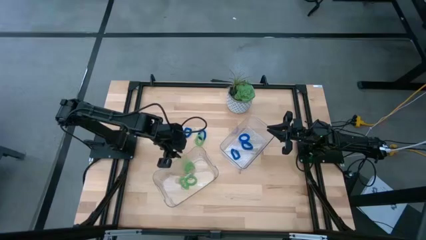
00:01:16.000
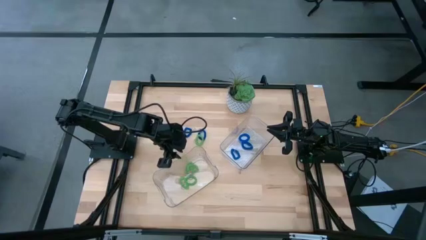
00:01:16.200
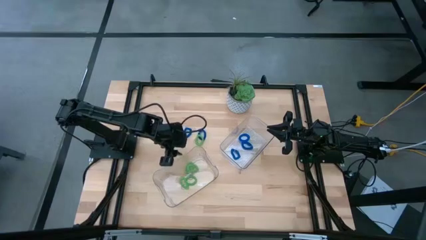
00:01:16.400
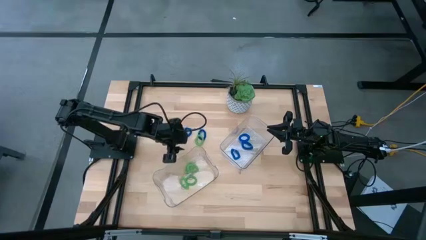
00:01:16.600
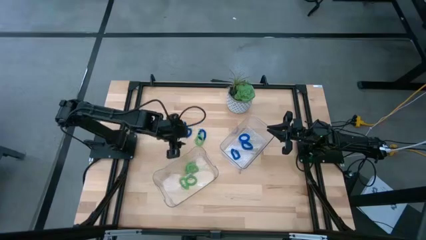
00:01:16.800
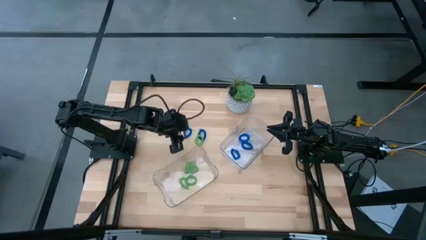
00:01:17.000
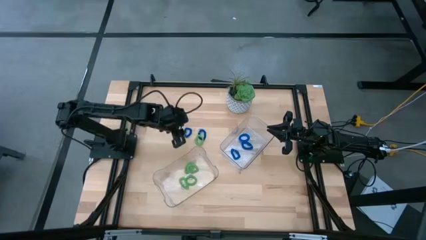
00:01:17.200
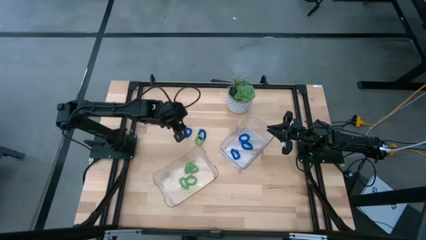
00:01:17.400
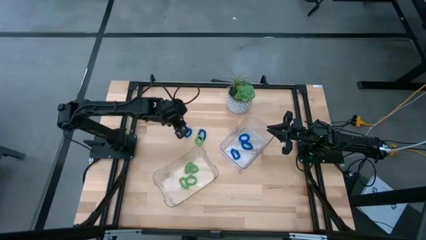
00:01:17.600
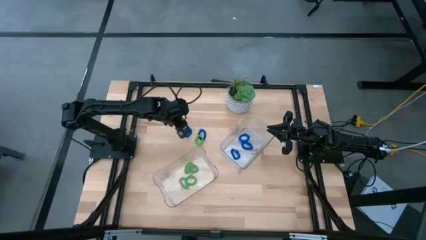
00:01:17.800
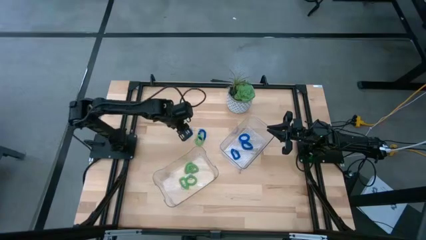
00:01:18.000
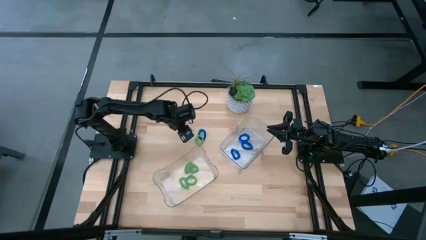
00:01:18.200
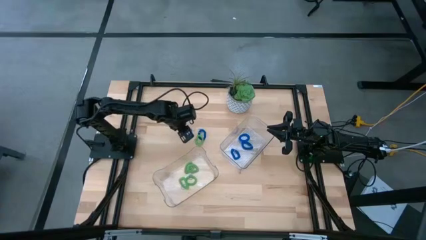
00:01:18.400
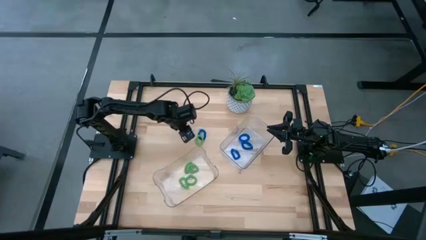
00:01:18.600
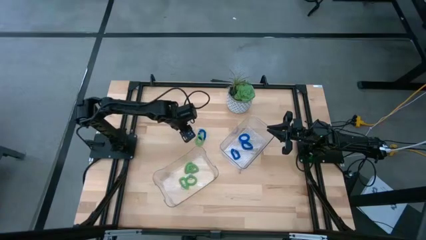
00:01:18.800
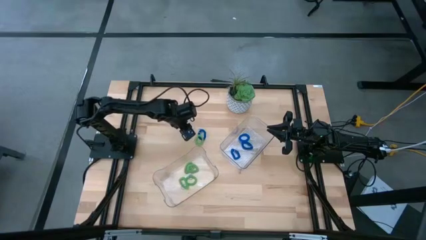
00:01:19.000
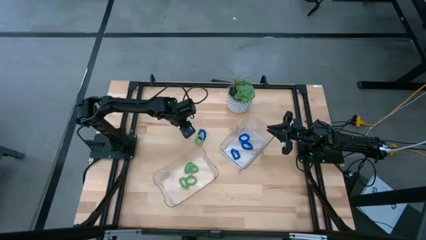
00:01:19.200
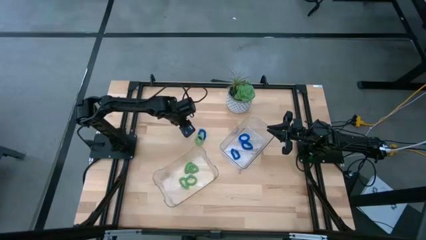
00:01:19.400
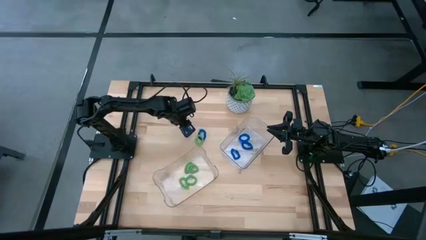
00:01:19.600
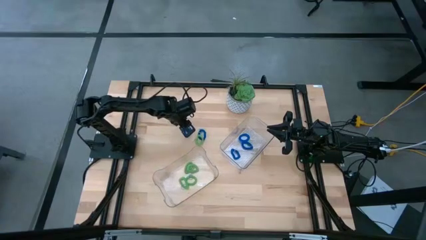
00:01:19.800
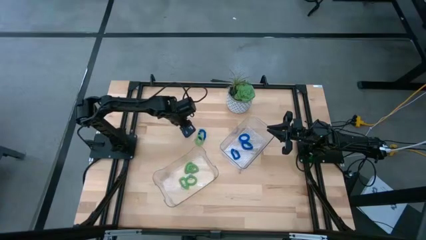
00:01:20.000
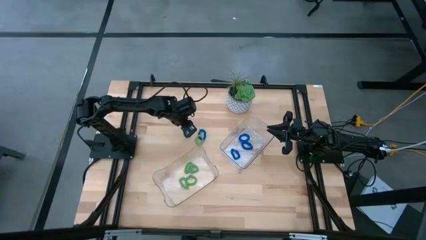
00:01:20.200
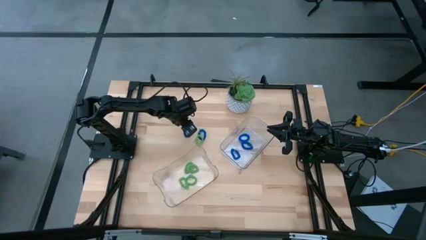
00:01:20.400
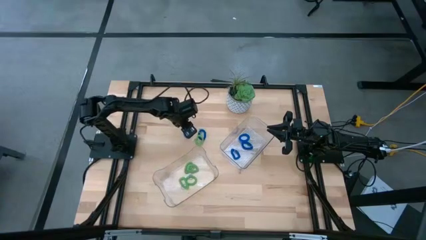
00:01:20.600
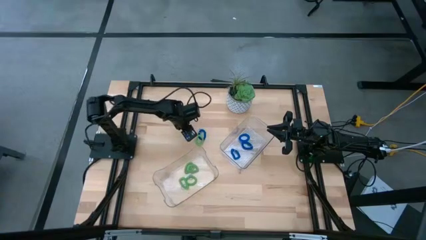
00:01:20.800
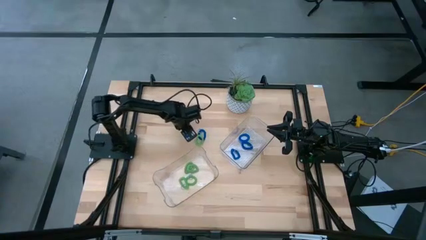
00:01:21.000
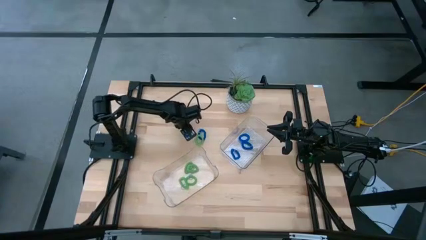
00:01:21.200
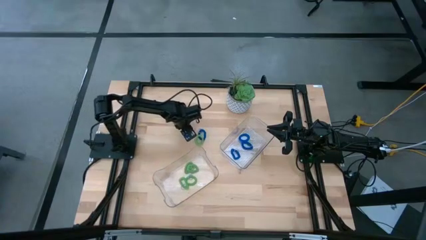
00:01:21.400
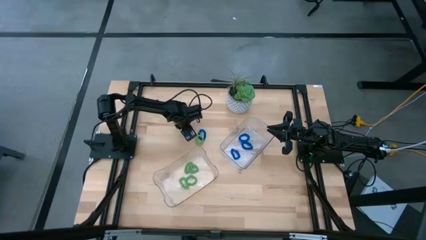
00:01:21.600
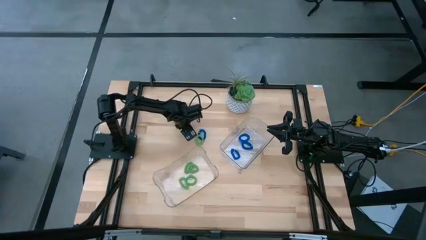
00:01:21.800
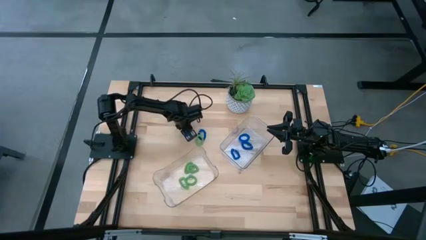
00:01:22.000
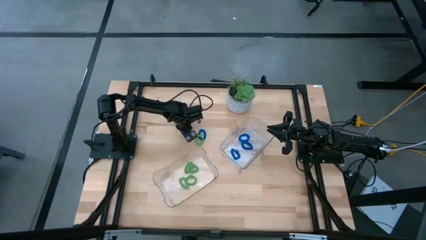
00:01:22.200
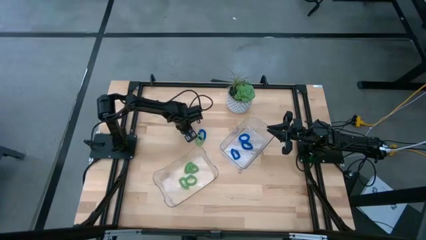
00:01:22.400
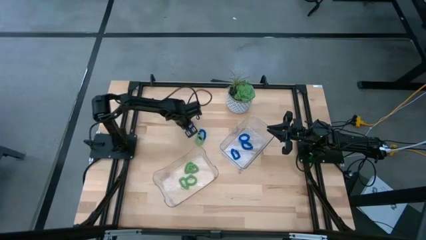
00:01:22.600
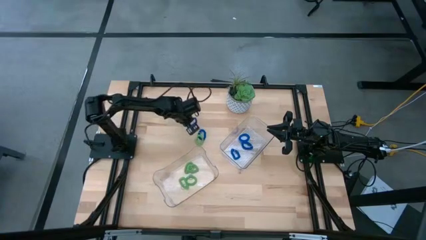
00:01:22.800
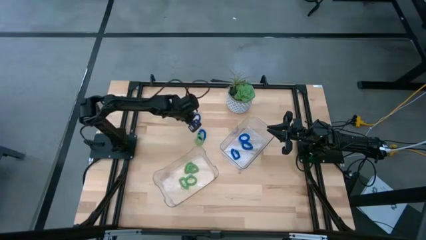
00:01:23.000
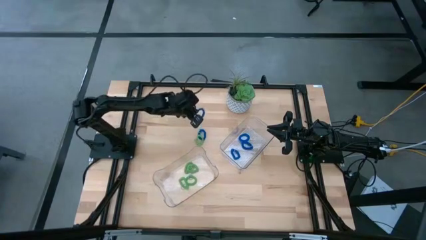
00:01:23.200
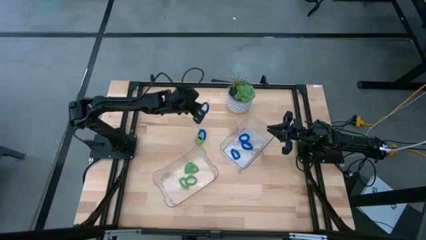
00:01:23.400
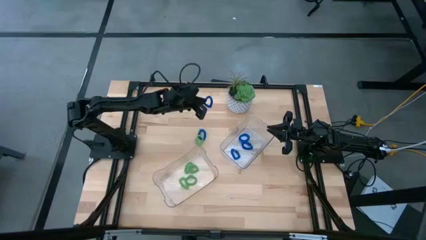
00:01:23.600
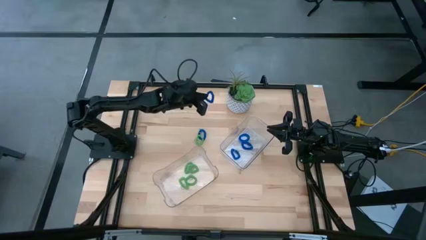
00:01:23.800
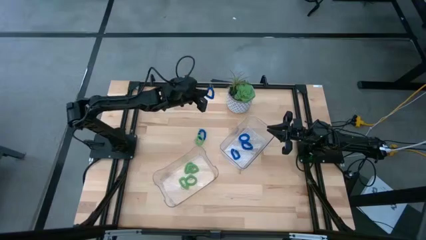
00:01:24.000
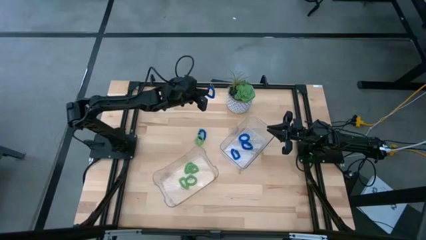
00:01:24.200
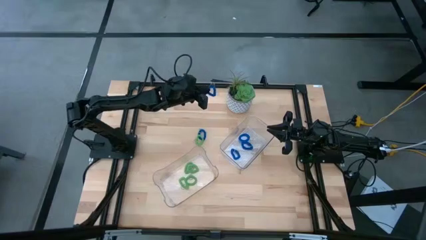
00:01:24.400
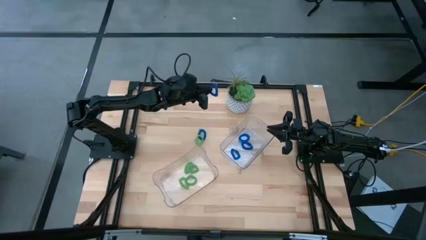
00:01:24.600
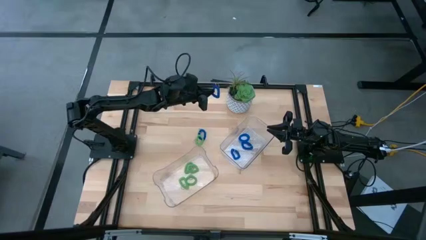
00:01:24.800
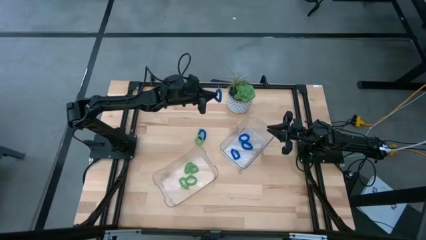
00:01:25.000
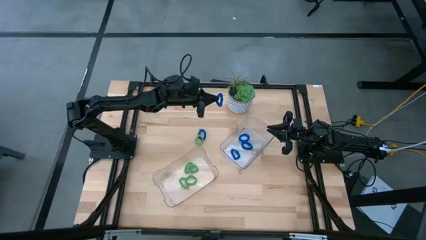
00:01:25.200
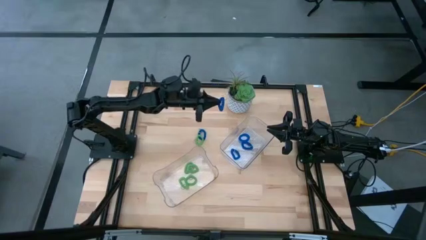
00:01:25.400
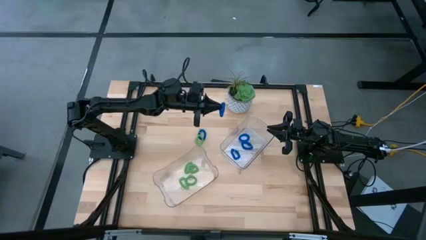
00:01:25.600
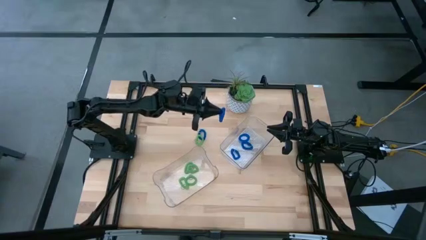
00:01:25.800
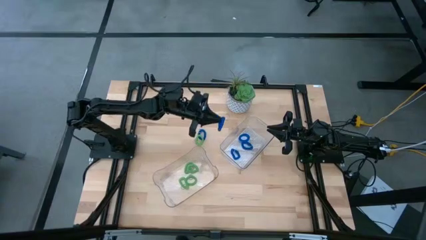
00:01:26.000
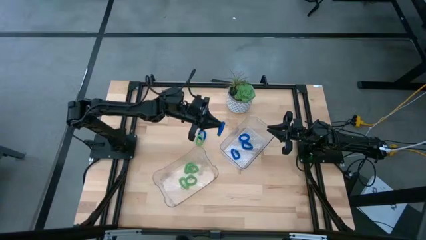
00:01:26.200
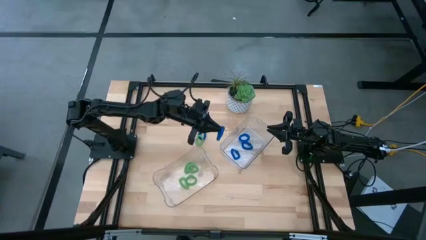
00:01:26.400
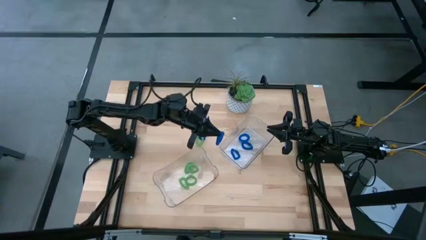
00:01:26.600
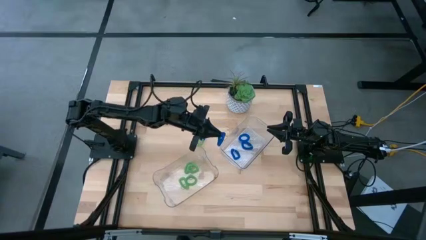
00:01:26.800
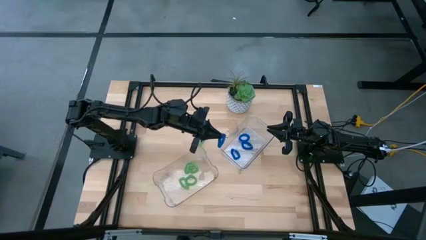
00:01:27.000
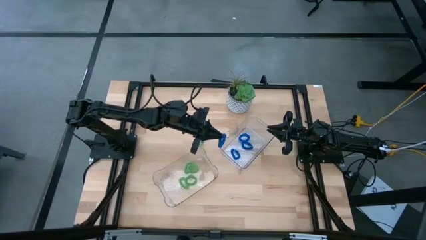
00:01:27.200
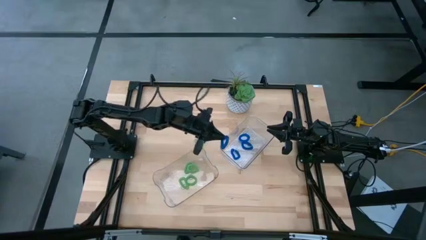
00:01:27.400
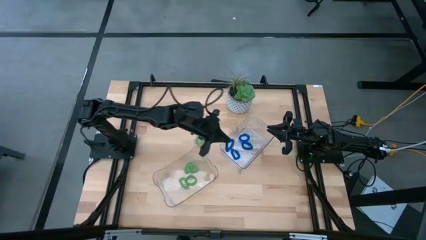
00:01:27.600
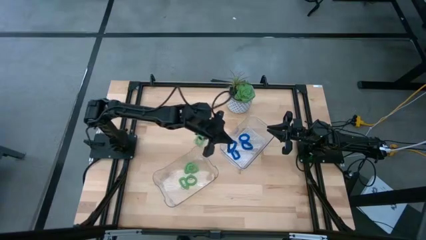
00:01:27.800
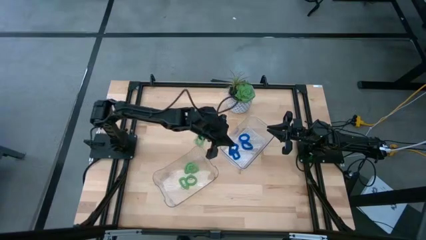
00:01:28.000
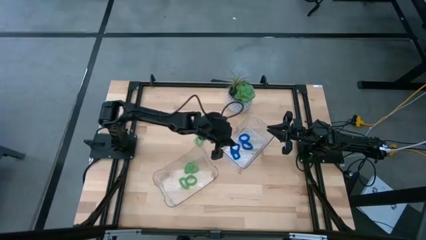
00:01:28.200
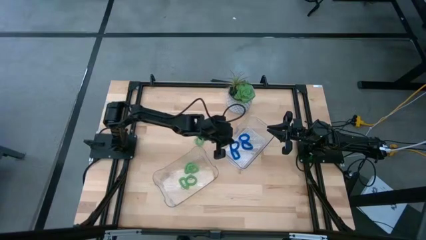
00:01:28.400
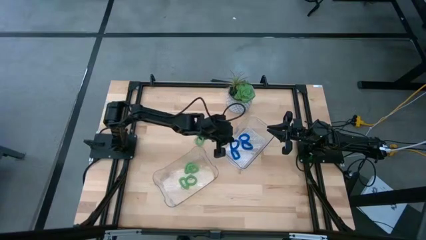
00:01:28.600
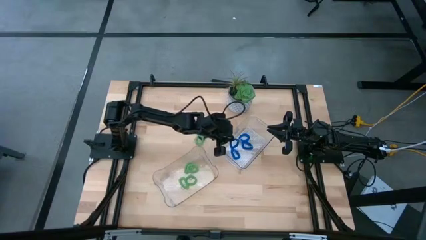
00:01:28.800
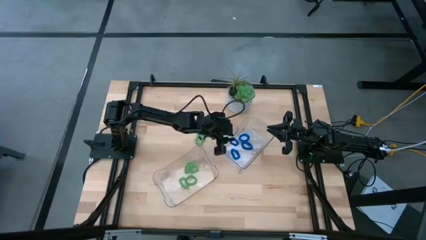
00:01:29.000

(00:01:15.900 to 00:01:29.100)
Task: Sort spring keychains
Put the blue spring keychain into the top transparent bin

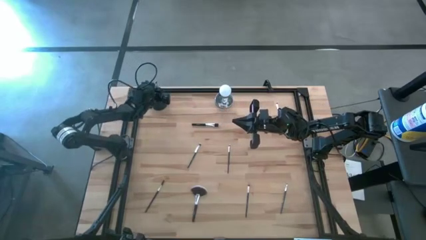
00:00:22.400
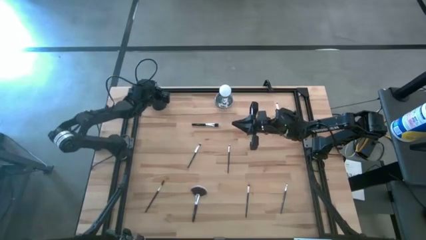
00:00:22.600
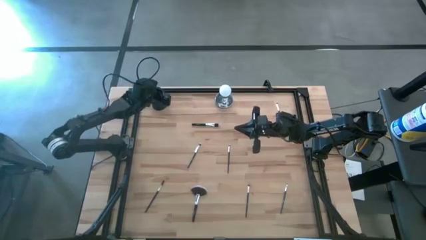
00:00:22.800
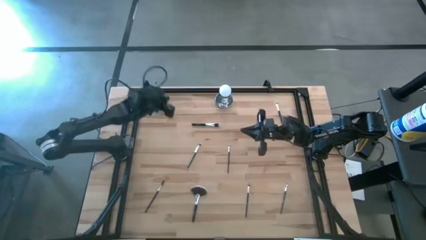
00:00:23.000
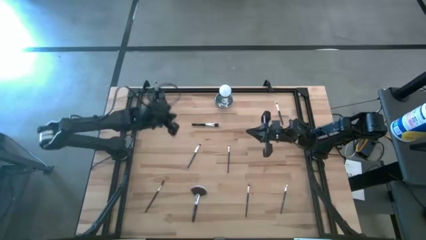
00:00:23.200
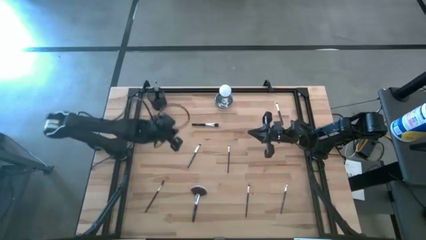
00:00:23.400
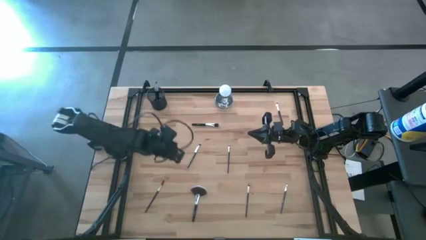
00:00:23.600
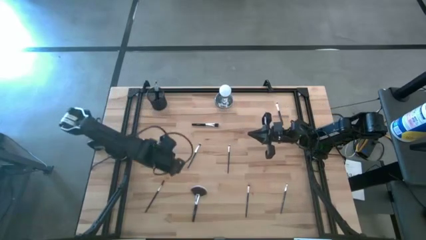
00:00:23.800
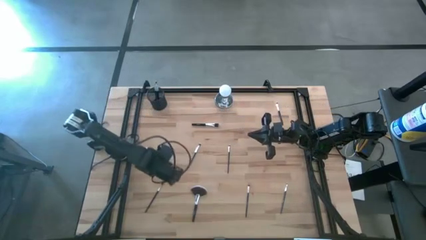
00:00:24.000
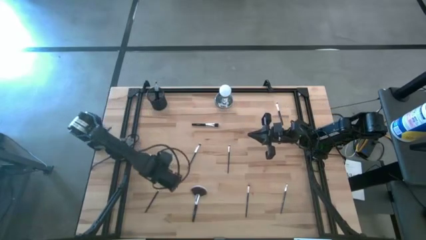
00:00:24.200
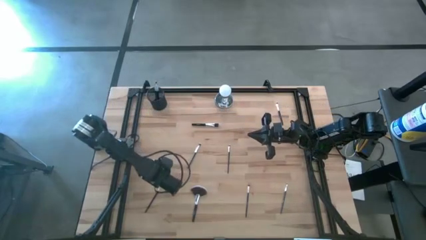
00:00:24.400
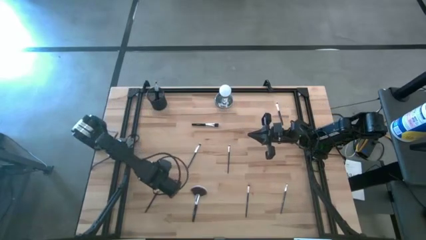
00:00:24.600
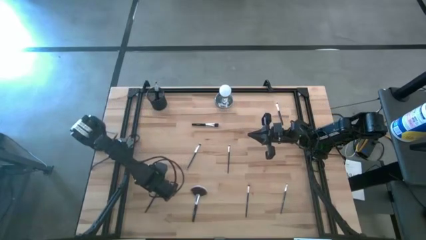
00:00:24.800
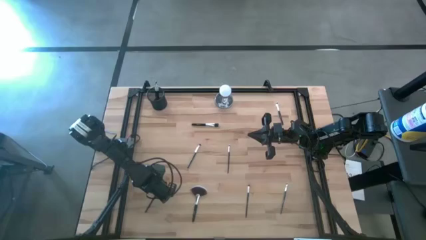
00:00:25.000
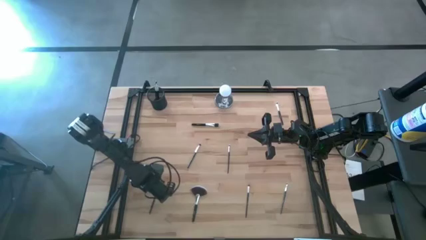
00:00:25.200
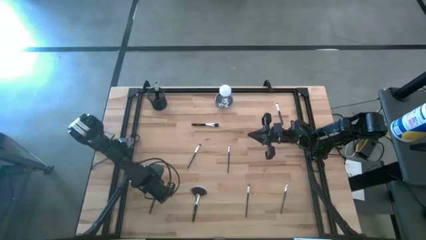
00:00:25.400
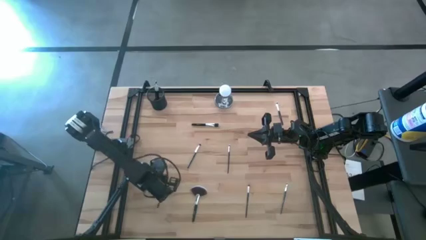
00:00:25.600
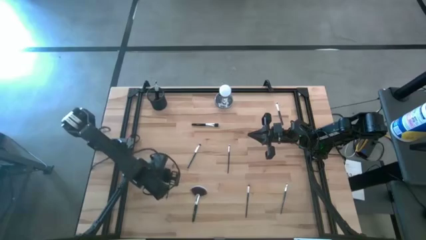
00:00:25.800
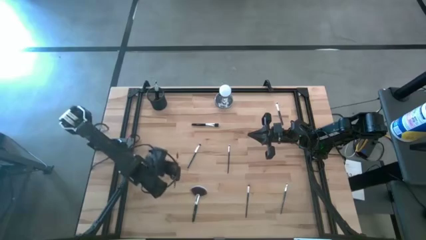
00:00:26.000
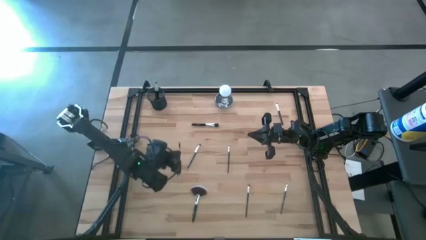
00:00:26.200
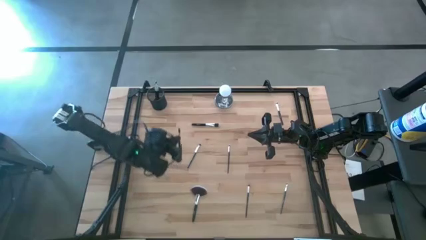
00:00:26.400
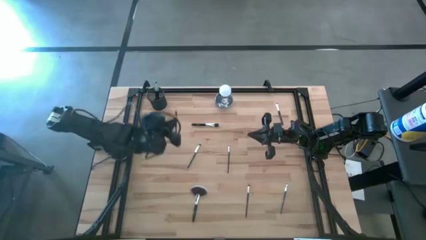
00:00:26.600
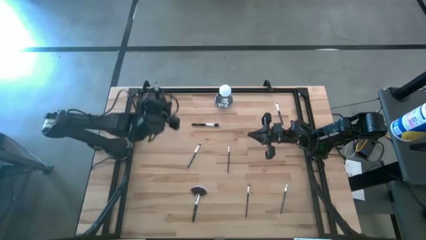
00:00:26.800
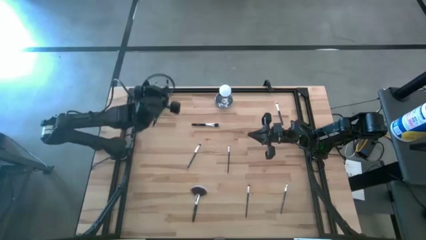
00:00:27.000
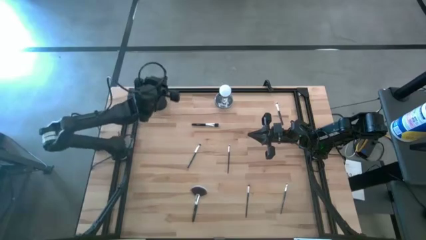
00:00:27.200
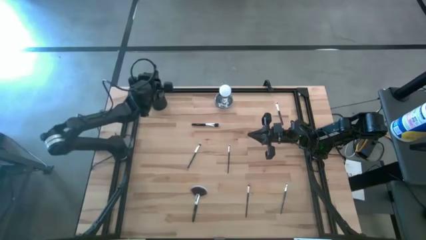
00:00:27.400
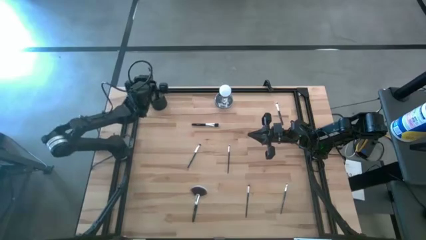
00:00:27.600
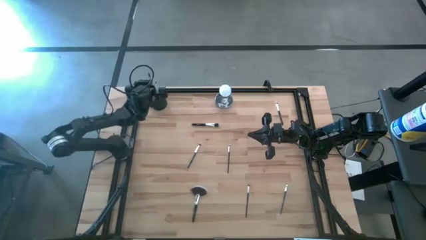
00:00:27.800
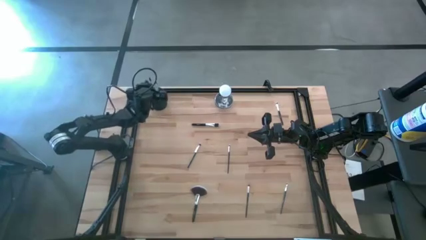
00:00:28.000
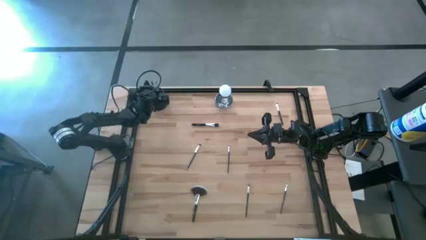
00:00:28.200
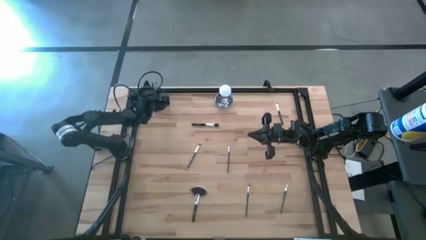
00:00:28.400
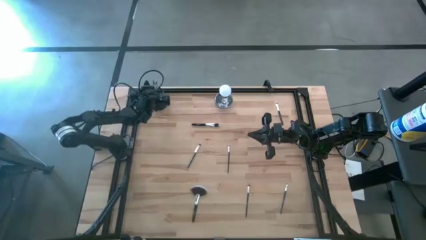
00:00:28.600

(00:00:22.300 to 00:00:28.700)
Task: Put items in baskets/containers
Put the eyebrow brush into the black brush holder
